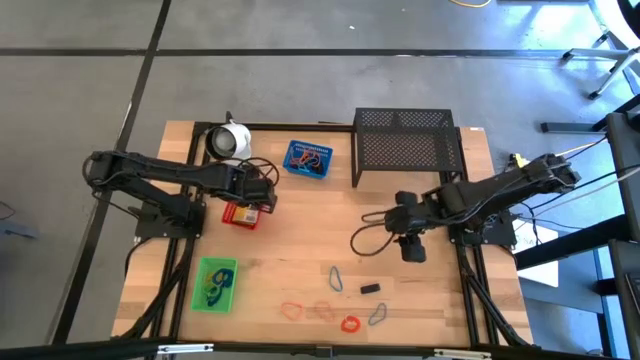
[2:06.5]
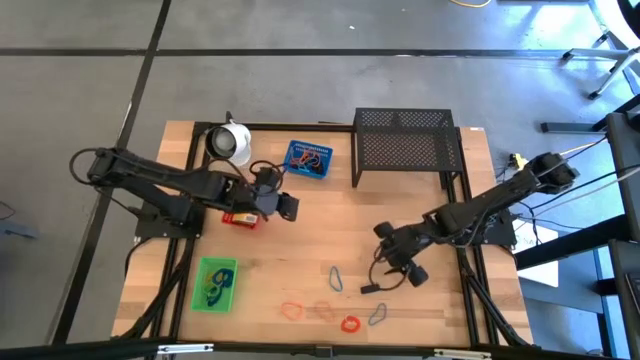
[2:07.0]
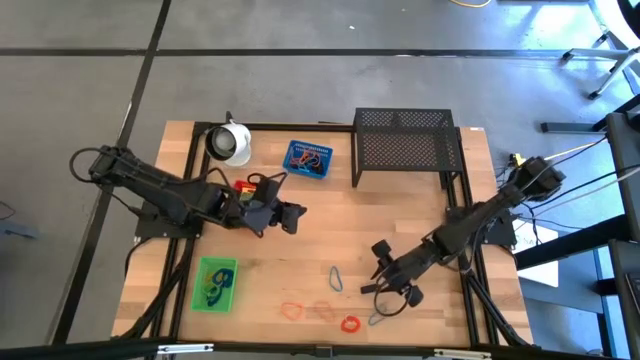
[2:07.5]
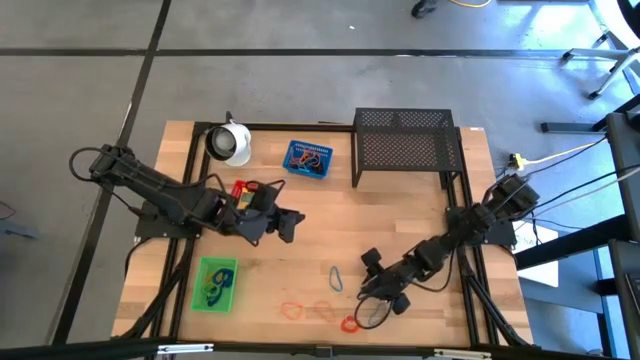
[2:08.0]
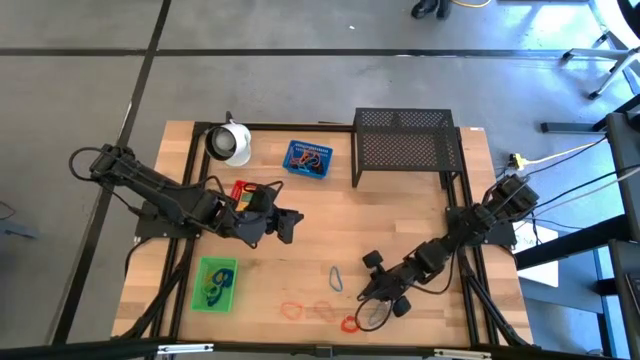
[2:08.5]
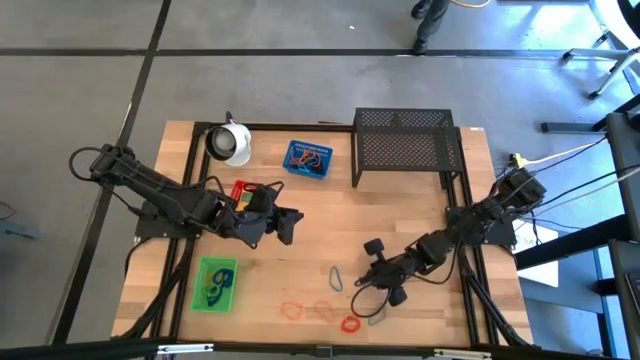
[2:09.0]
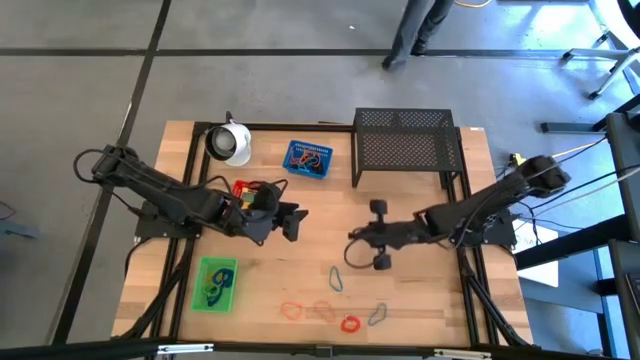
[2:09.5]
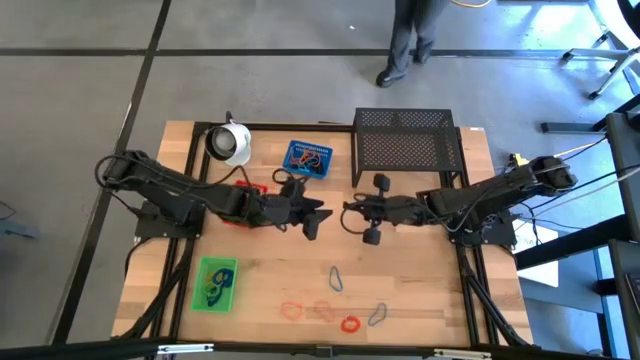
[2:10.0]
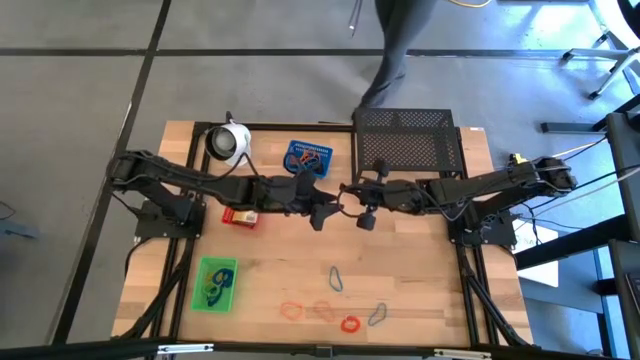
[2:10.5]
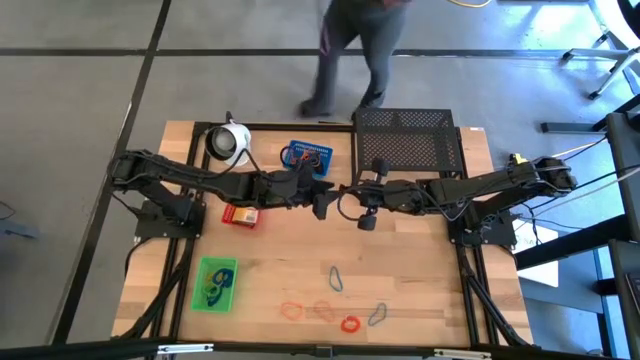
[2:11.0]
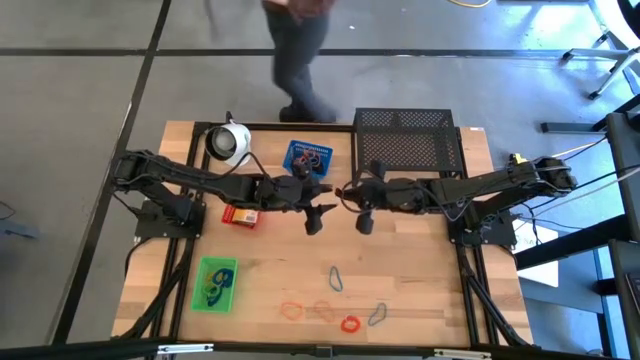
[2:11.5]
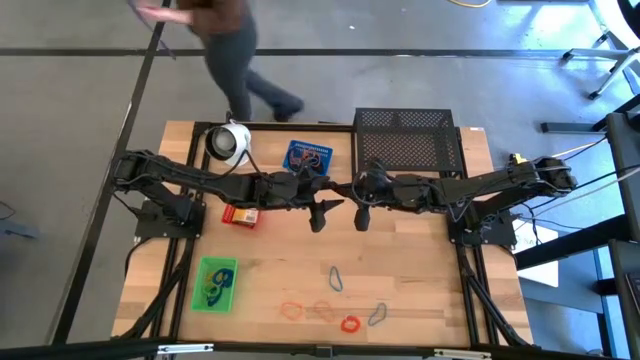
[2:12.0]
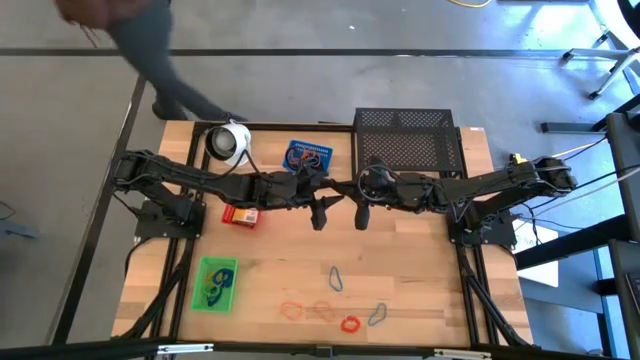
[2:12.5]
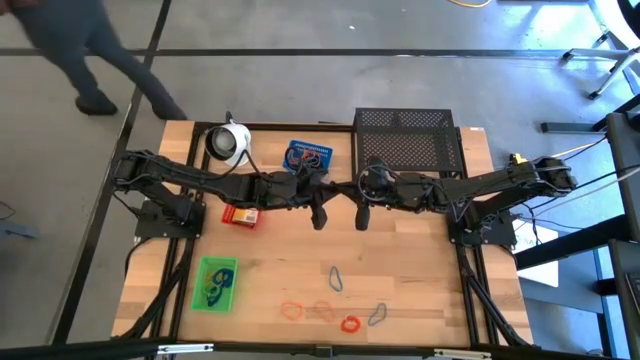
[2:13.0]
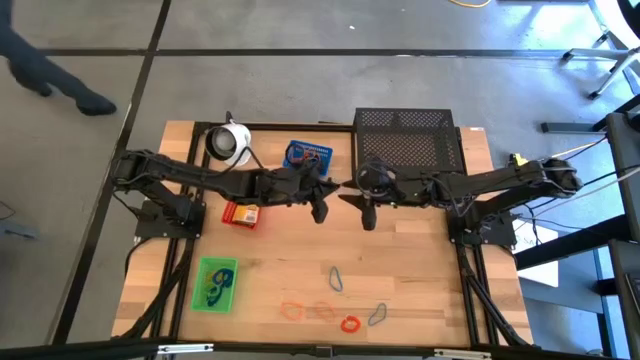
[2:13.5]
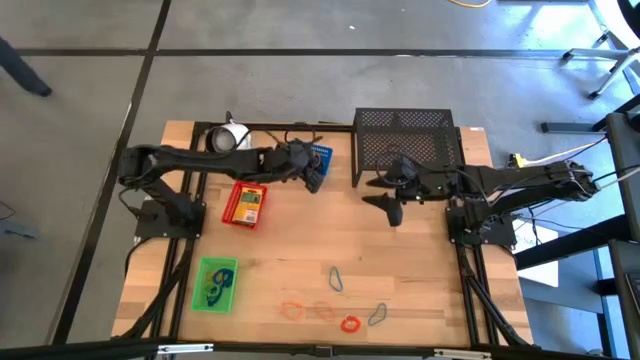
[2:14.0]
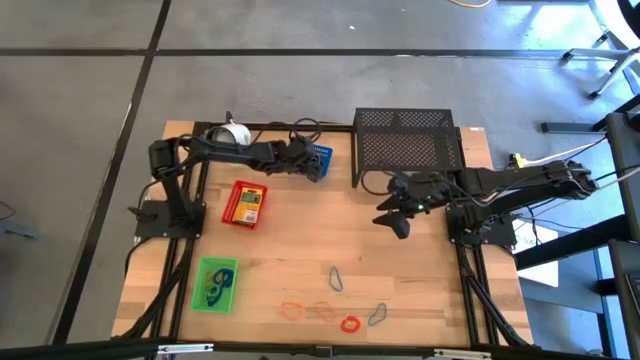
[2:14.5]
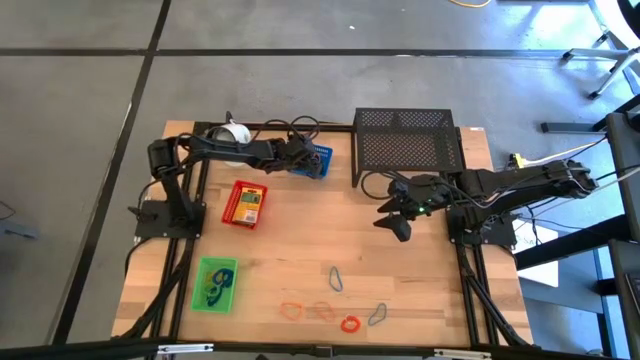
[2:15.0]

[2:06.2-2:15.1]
Task: Pick & Place Office Desk Supplies
Put the black rubber band into the blue bin

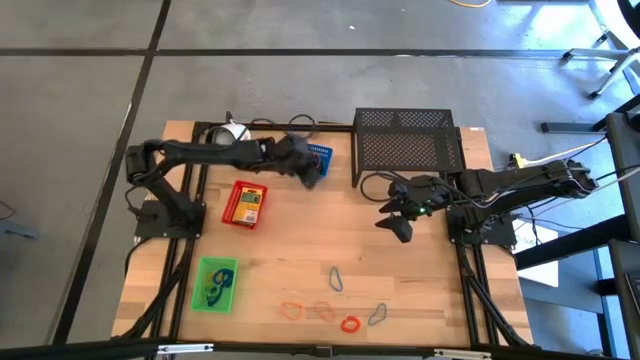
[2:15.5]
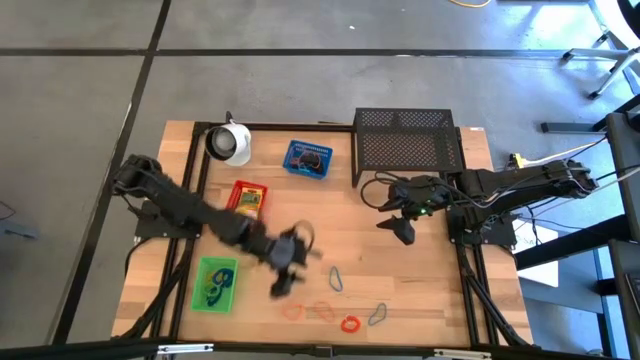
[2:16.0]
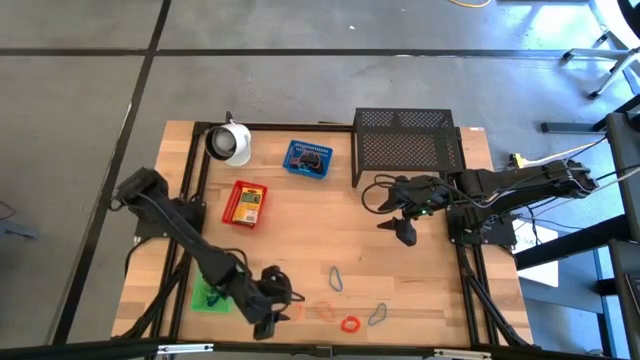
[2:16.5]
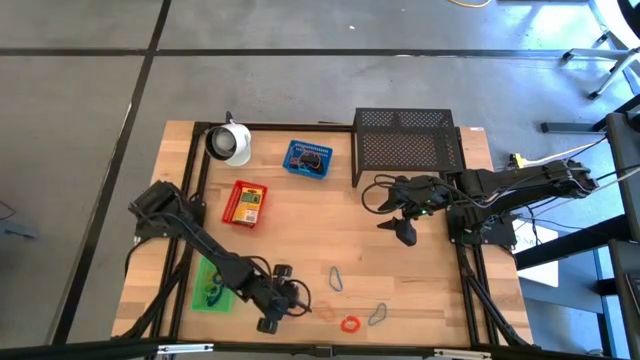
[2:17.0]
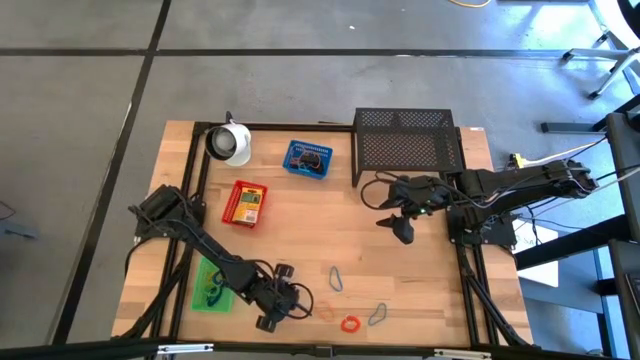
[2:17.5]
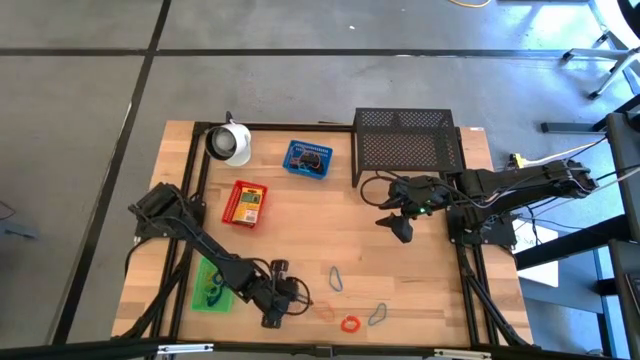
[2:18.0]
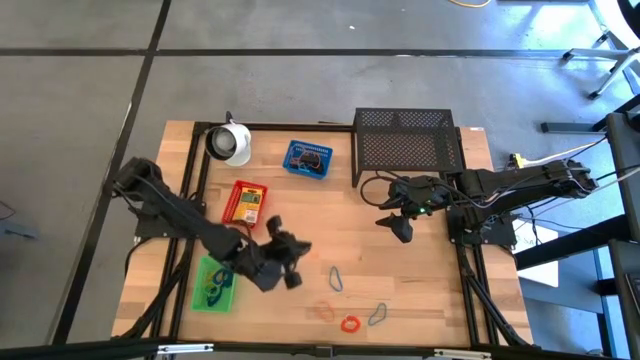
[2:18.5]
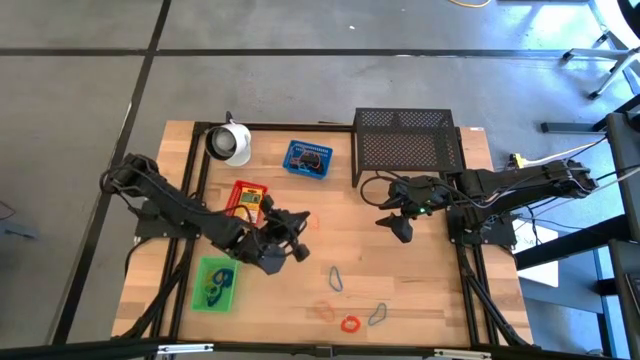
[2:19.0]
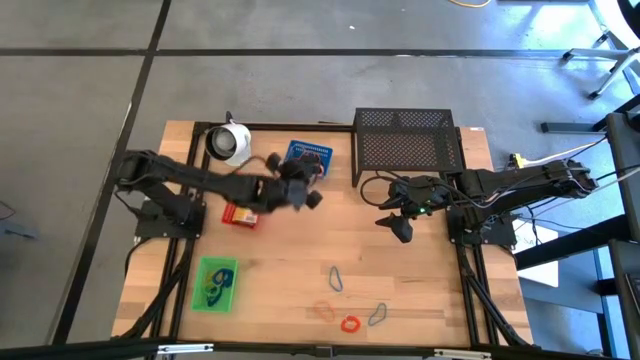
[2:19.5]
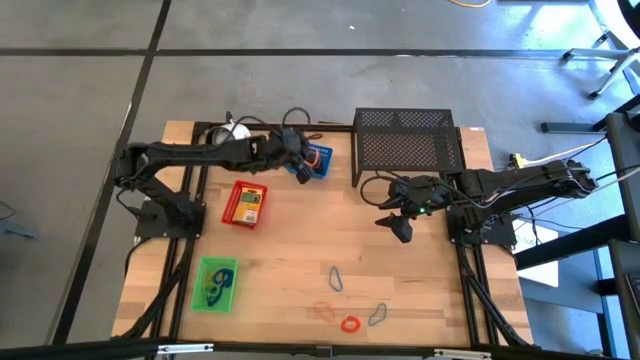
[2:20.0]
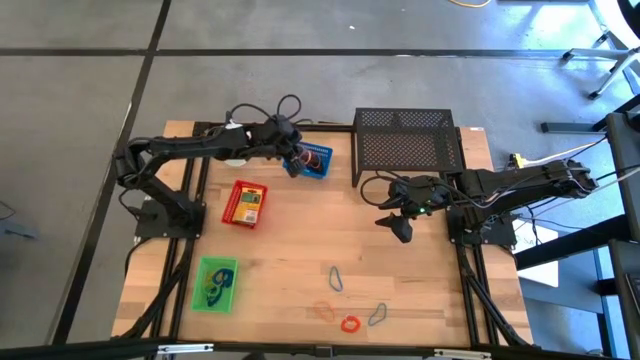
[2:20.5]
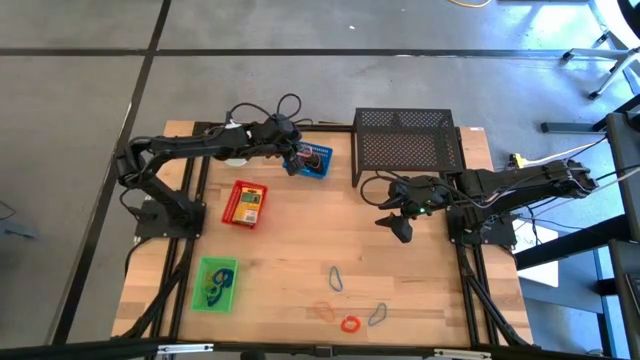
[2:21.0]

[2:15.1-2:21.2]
Put the orange rubber band into the blue bin

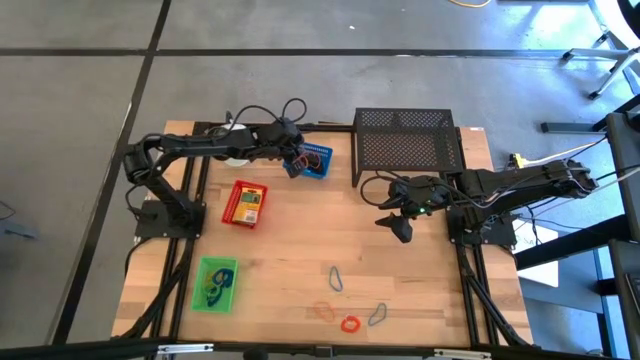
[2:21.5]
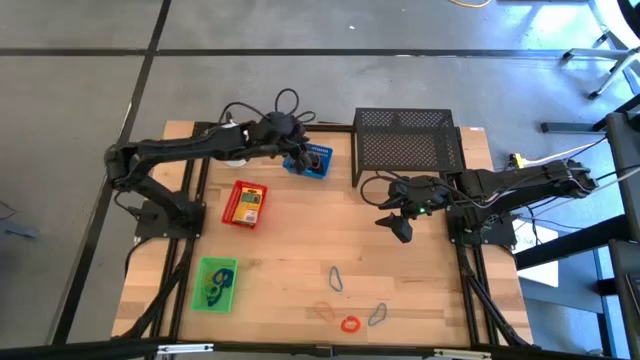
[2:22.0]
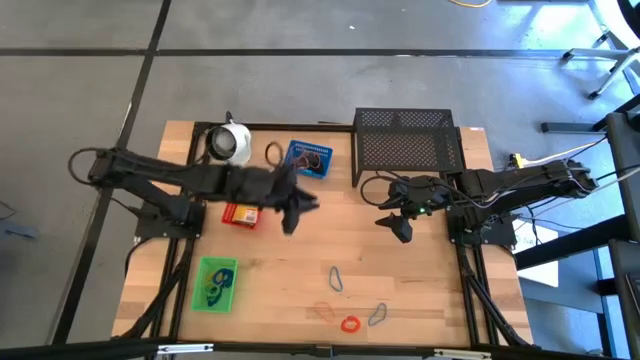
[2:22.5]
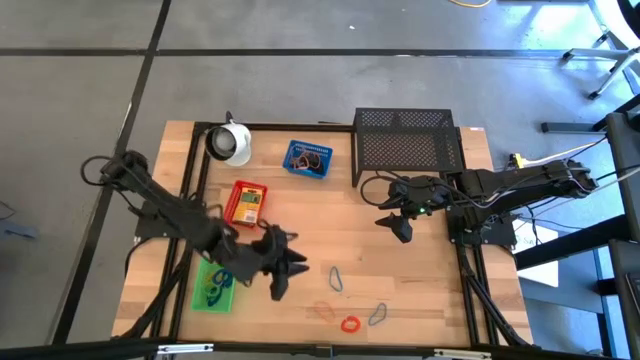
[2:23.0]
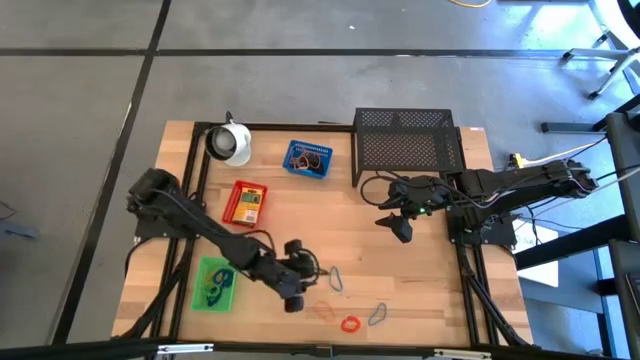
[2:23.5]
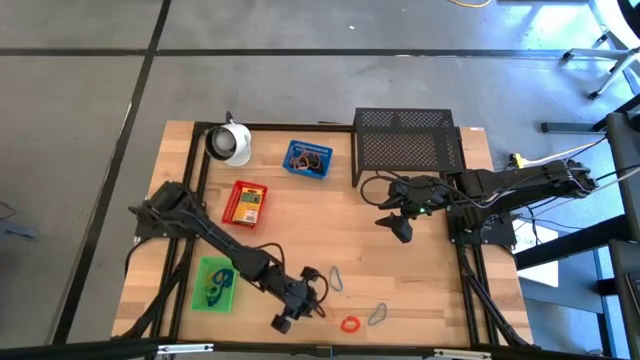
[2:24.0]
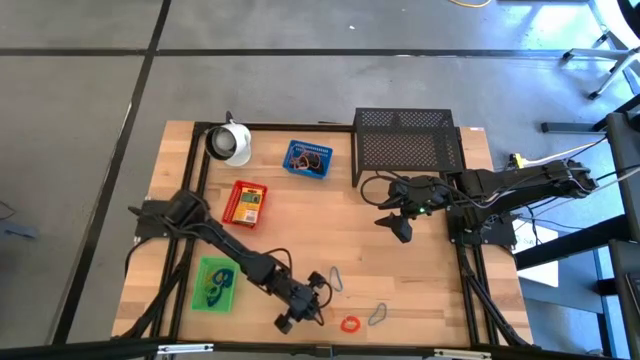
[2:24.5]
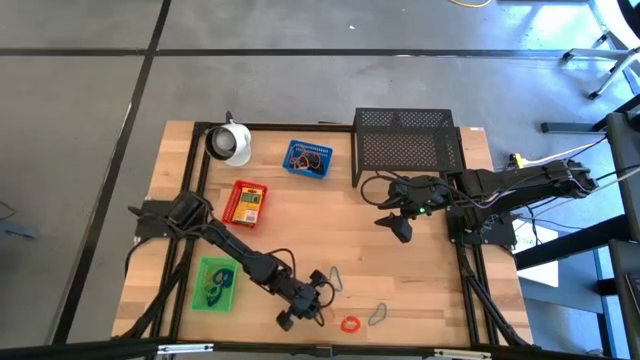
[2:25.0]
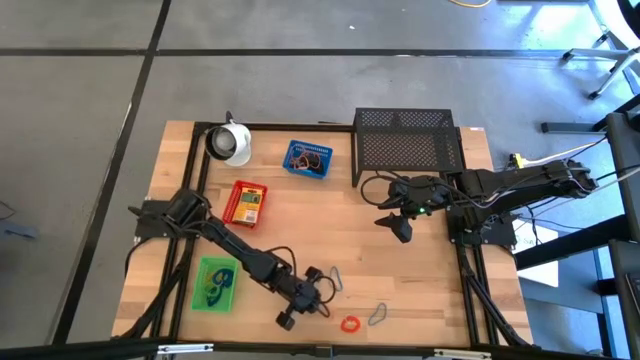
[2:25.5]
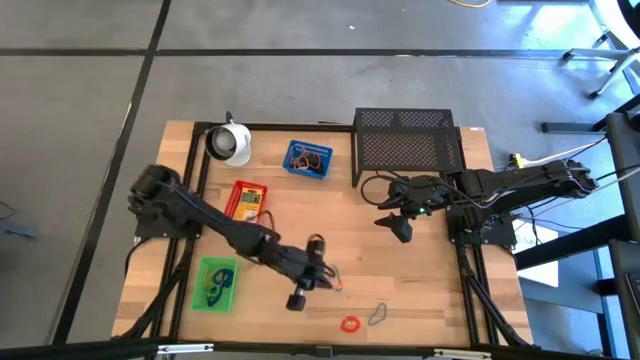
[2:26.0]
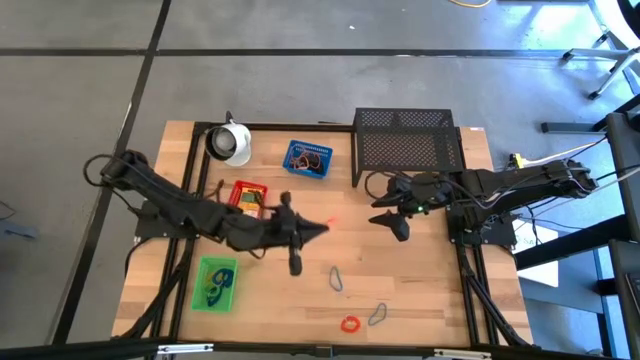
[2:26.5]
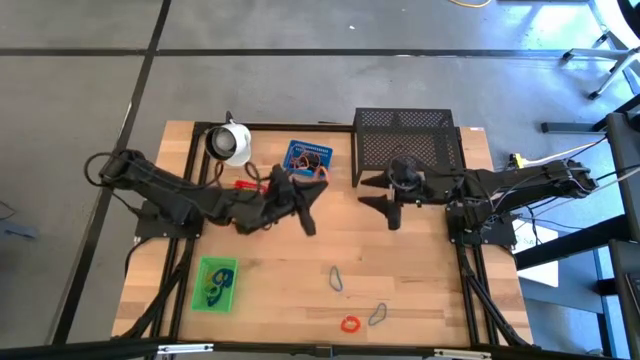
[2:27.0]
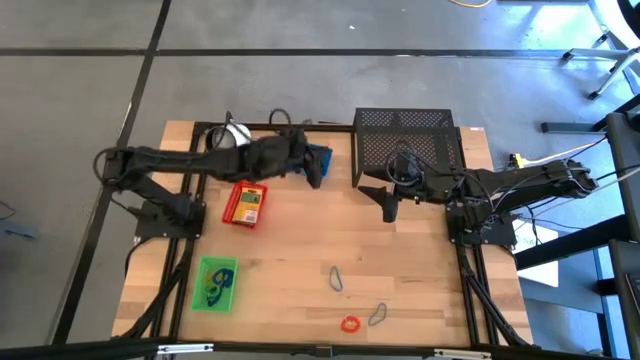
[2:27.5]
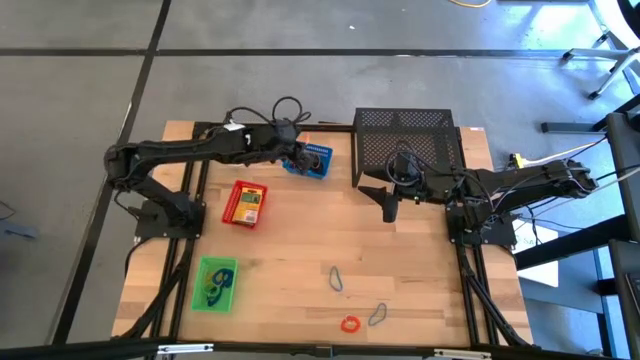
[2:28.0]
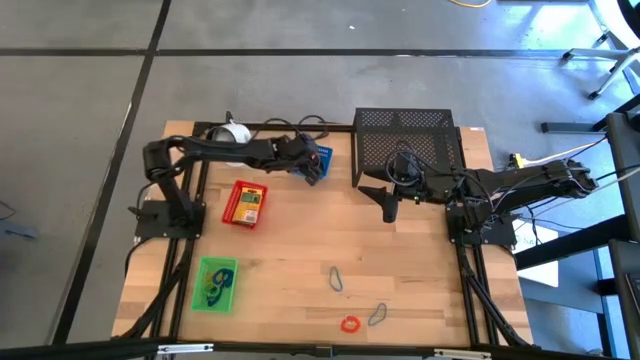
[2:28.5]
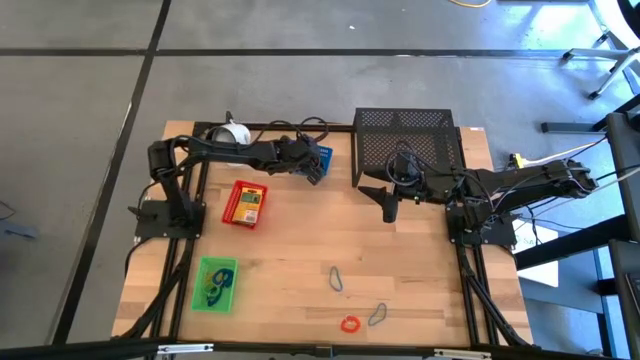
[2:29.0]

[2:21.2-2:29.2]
Put the orange rubber band into the blue bin
